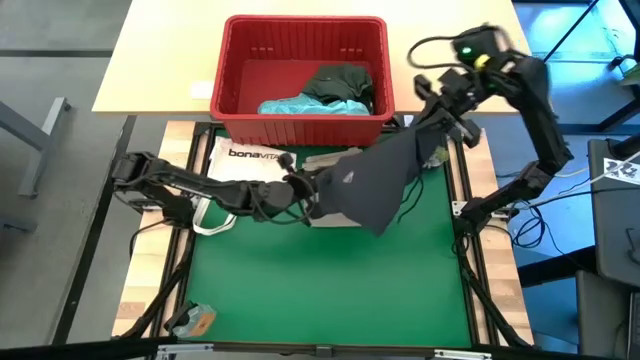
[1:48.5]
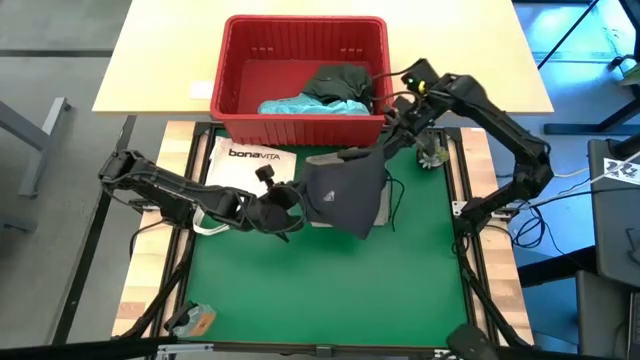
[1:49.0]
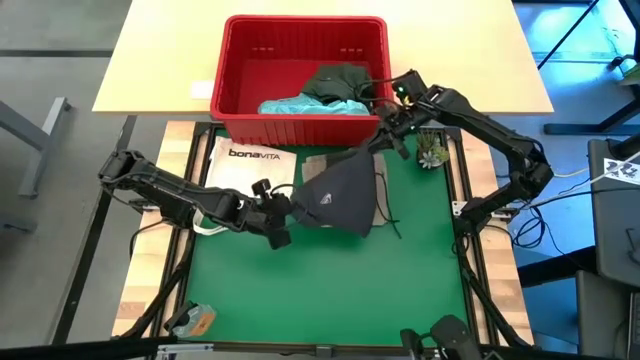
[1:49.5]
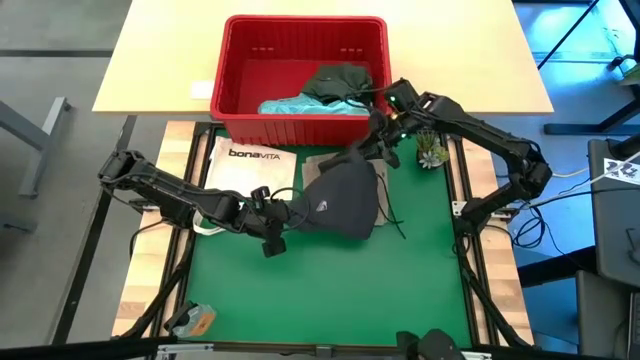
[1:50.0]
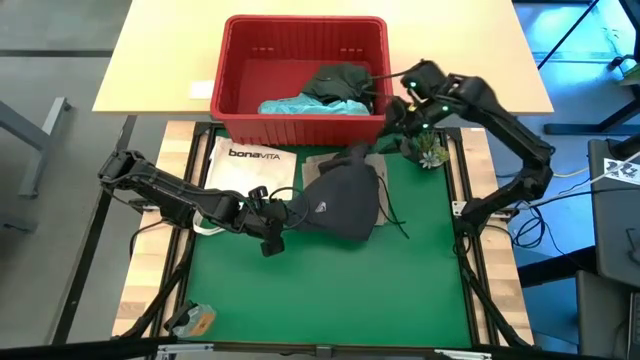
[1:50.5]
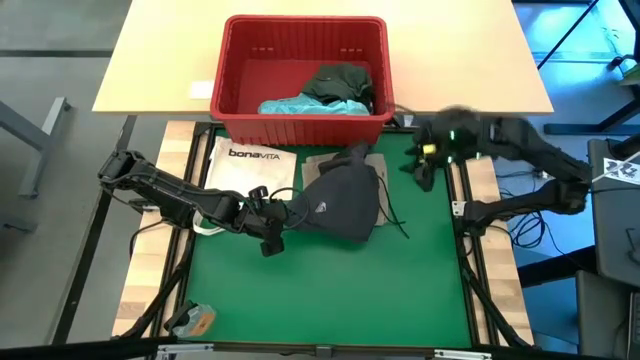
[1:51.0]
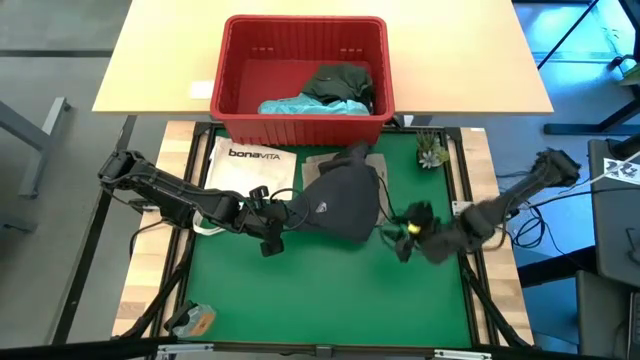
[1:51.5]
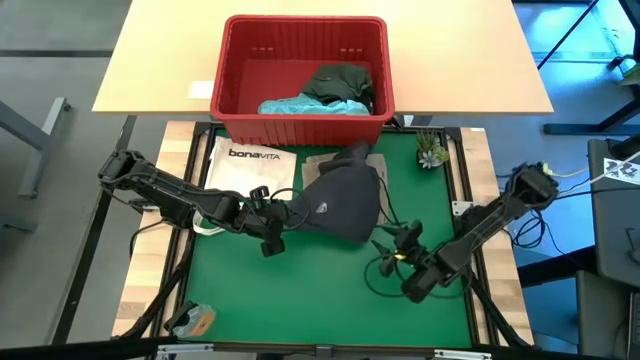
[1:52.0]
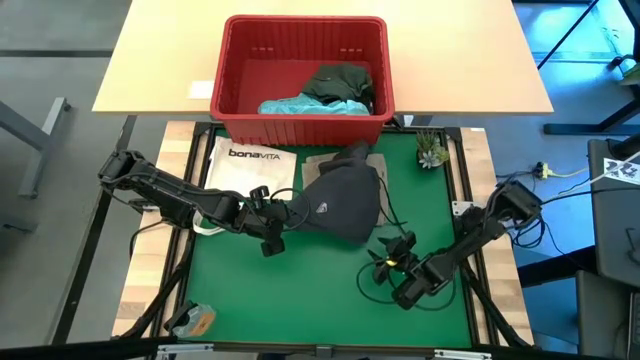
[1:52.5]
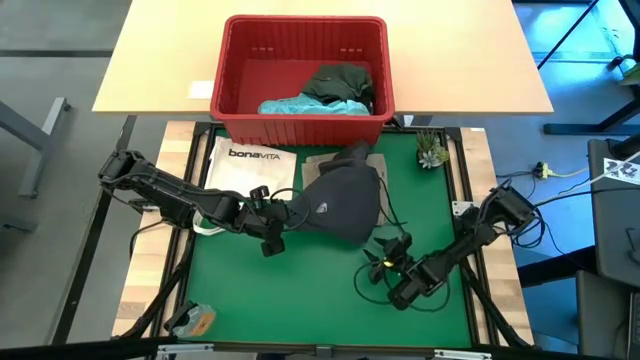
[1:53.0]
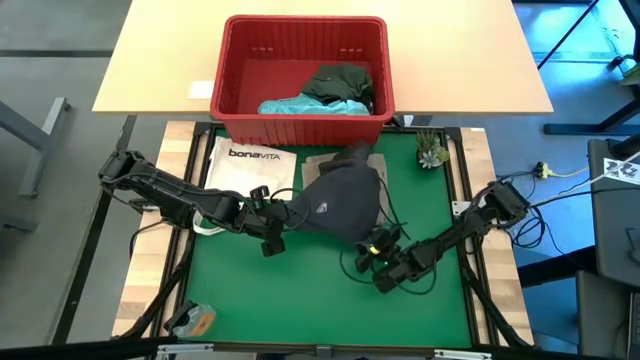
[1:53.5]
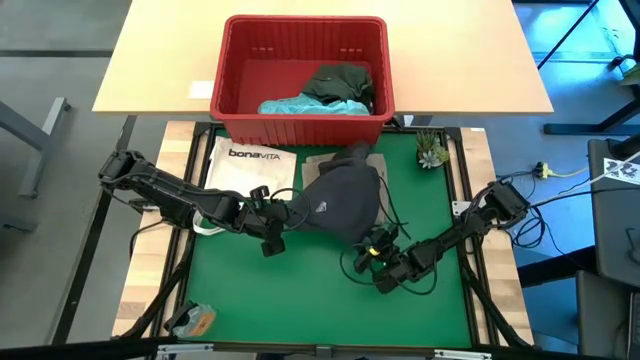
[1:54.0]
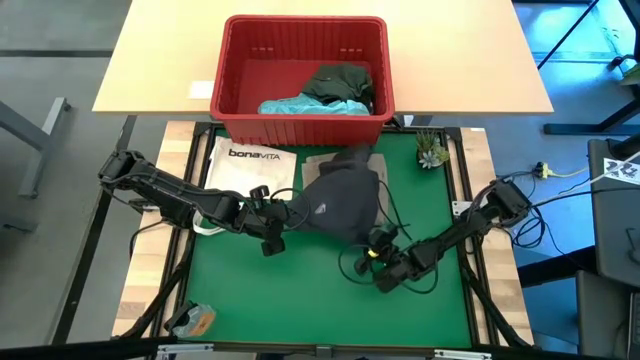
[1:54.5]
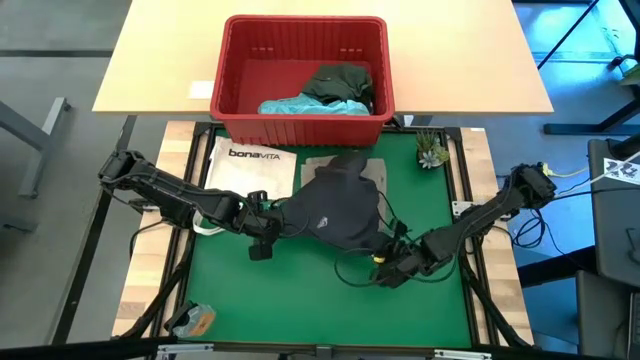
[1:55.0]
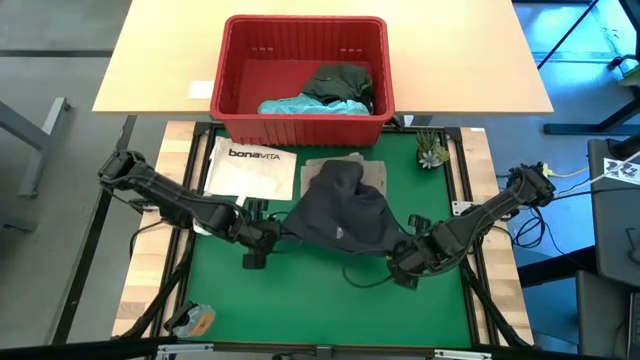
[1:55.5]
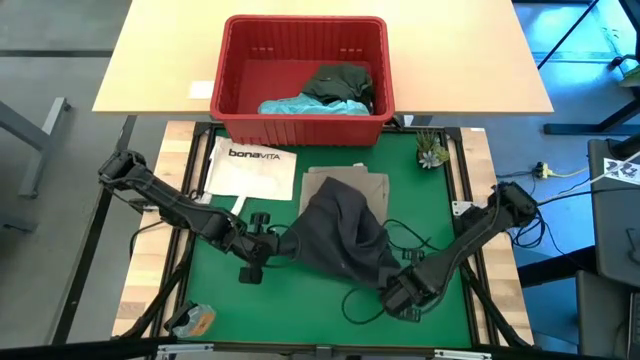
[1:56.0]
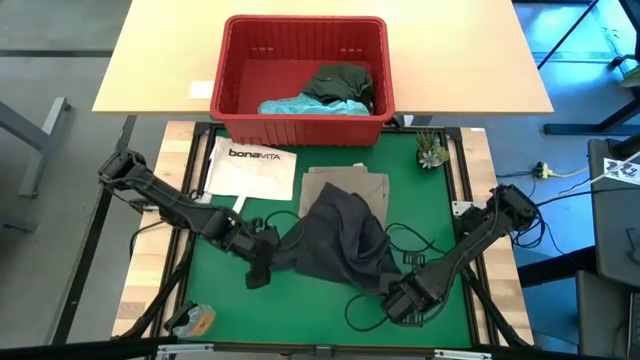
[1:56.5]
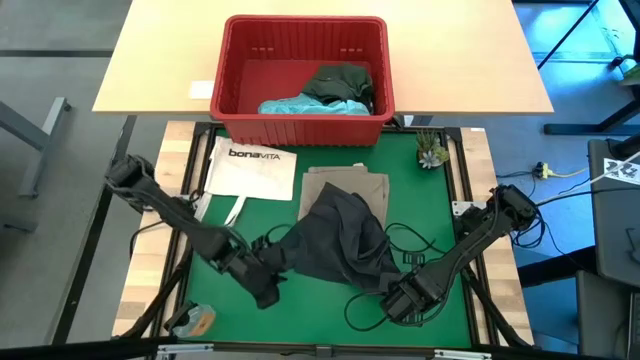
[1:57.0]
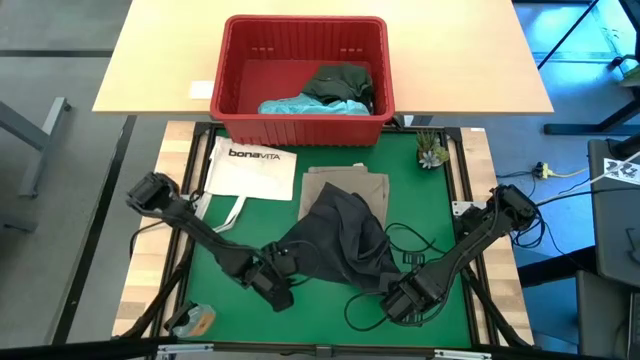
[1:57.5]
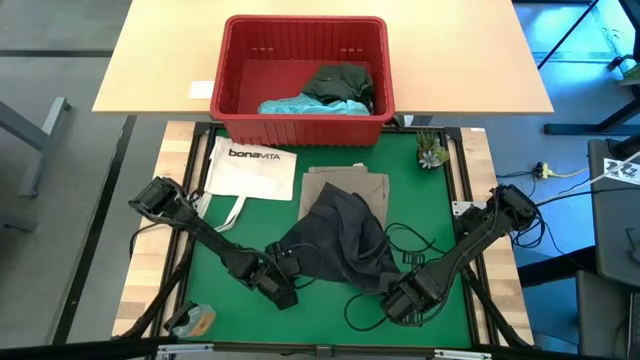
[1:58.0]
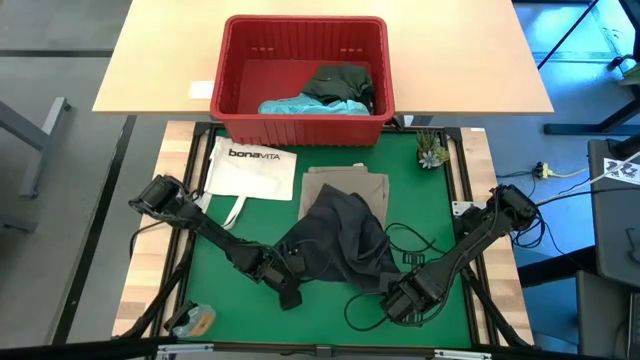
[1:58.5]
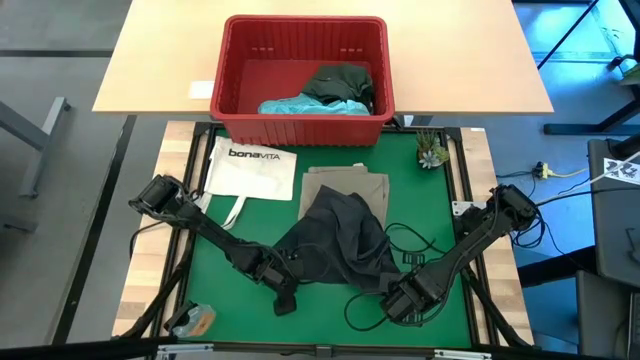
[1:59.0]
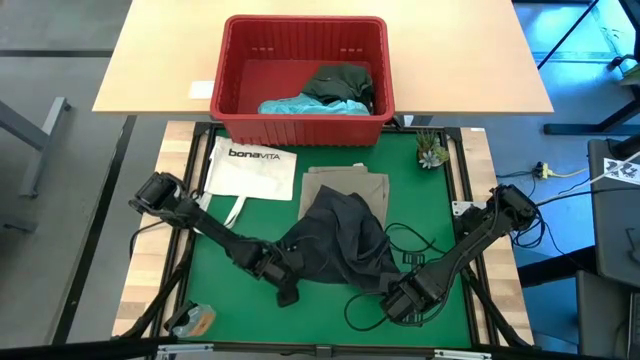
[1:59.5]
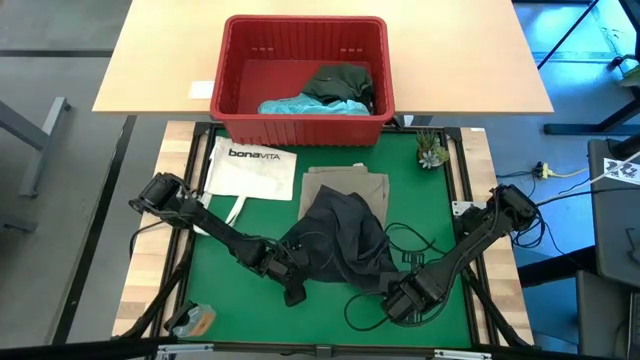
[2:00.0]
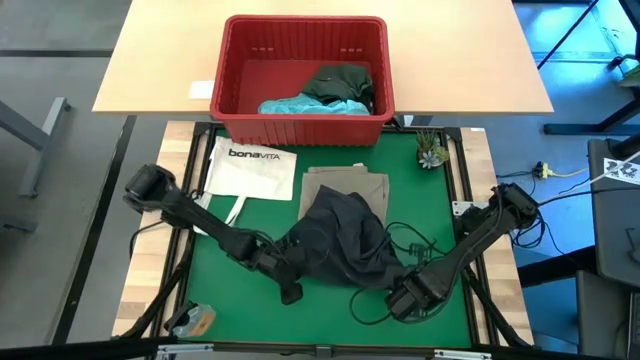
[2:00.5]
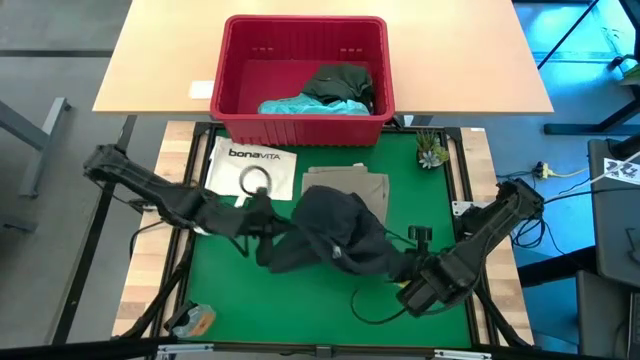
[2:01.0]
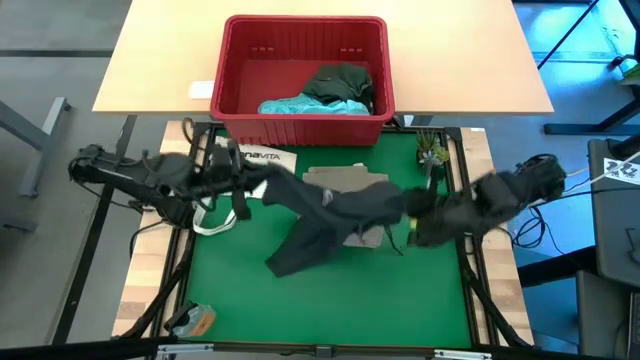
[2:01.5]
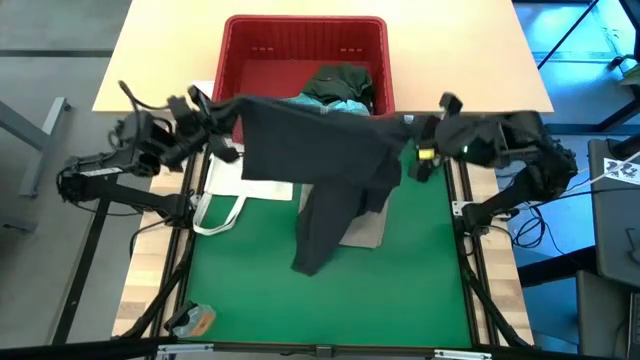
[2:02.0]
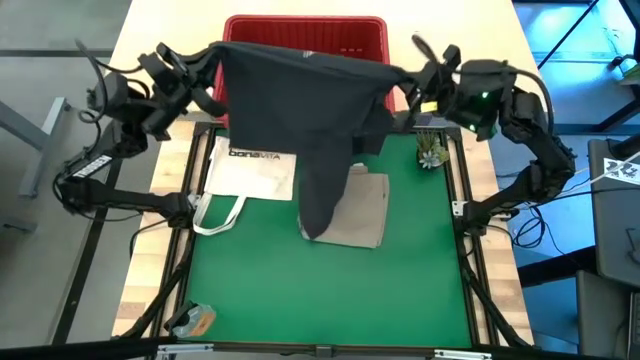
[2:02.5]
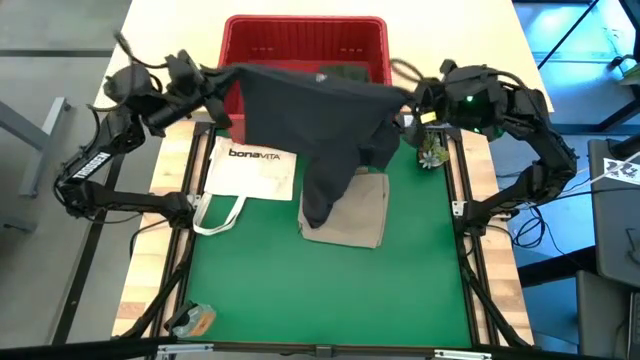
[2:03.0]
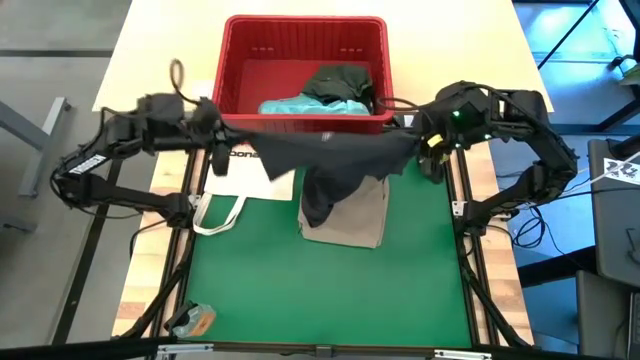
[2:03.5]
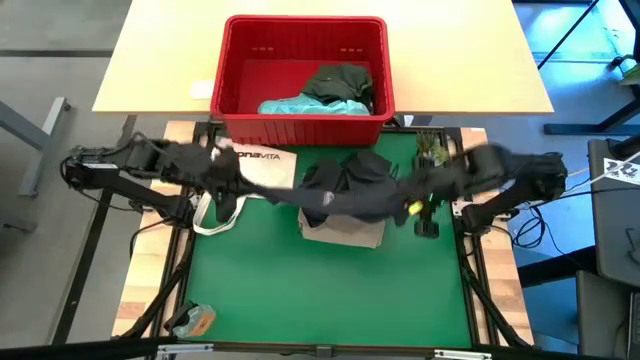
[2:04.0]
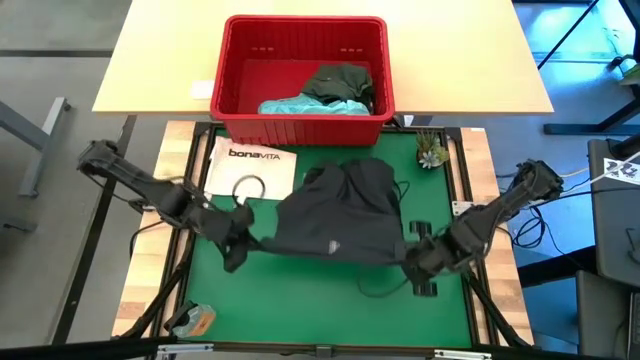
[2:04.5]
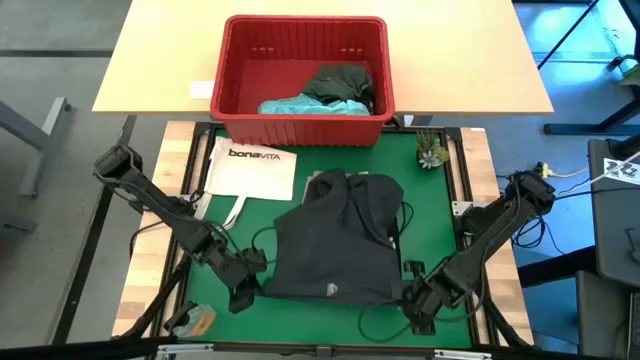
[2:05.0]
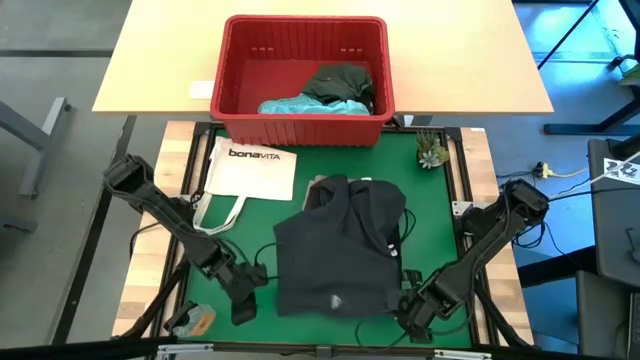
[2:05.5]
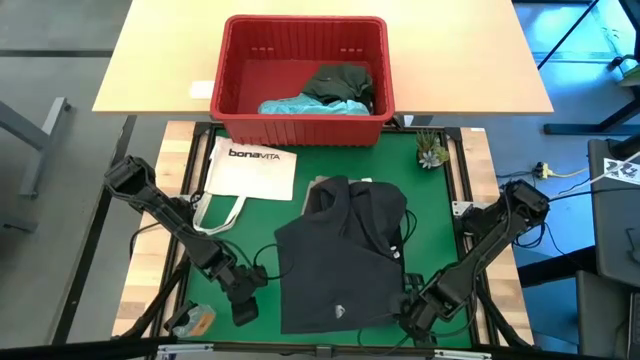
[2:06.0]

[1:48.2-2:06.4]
Task: Fold Laundry from Bin
Remove the black shorts from the red laundry bin

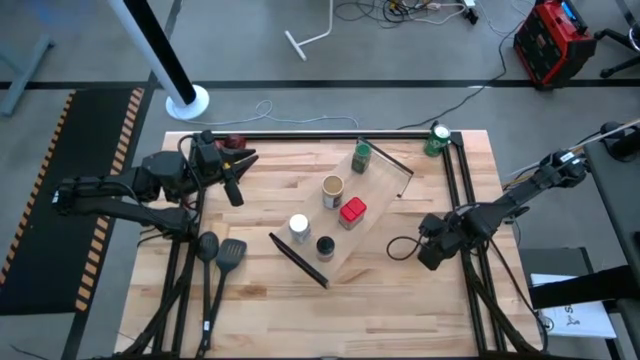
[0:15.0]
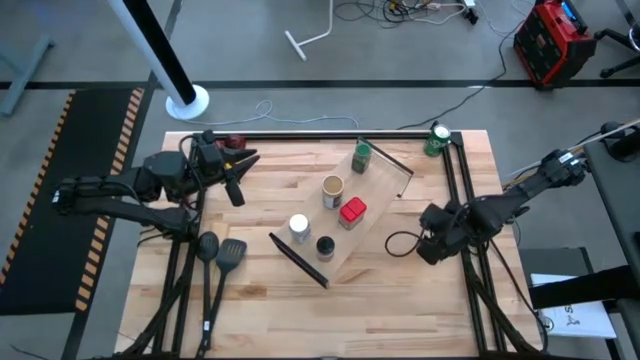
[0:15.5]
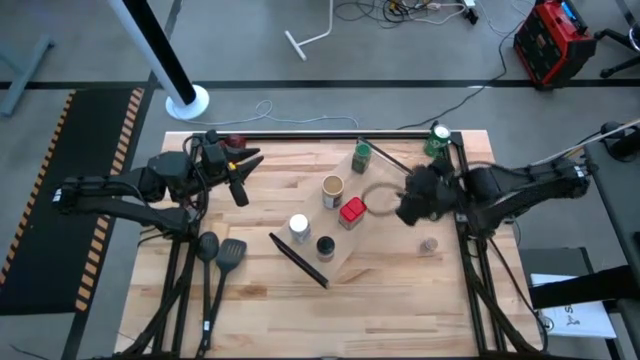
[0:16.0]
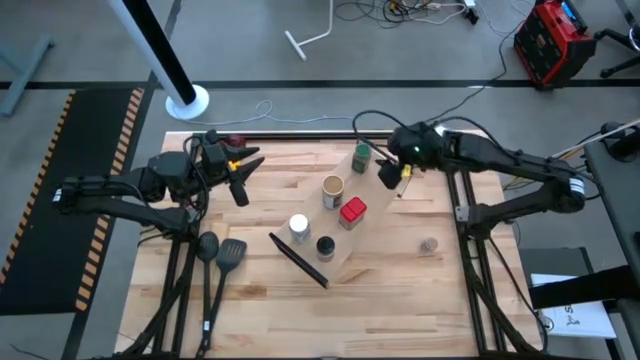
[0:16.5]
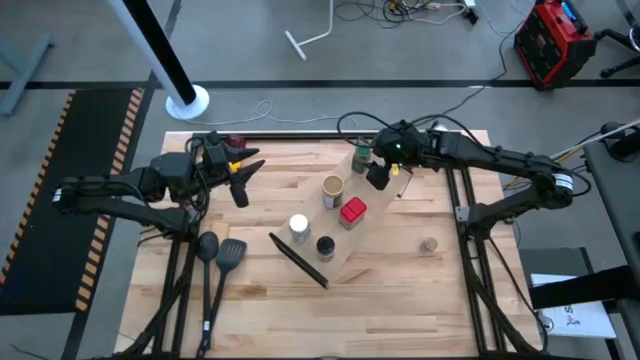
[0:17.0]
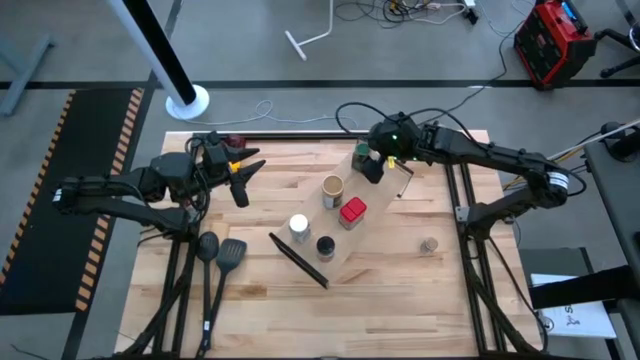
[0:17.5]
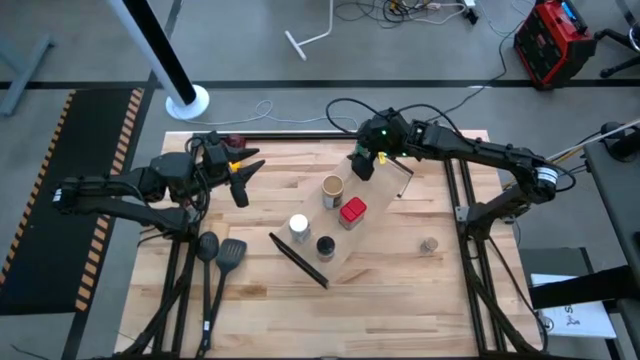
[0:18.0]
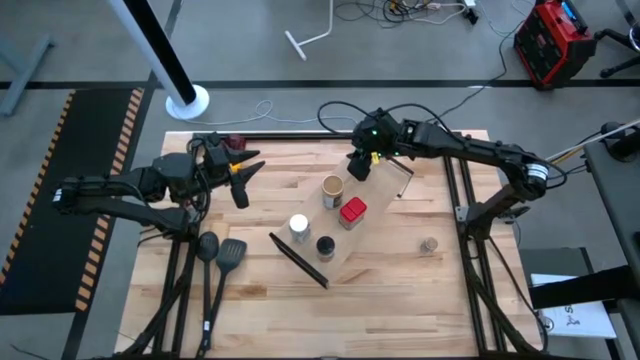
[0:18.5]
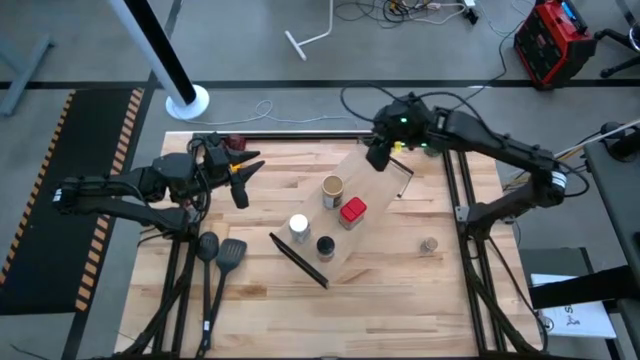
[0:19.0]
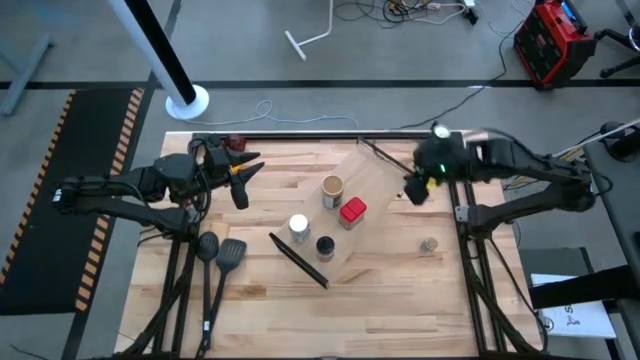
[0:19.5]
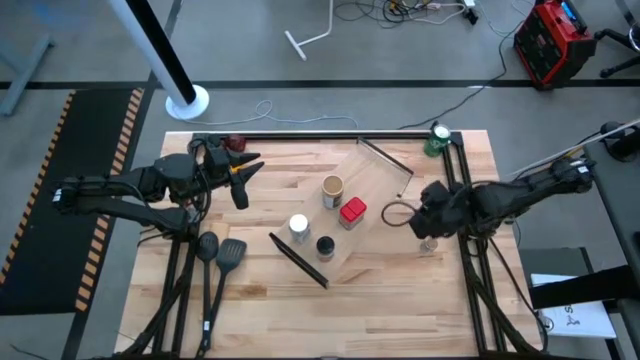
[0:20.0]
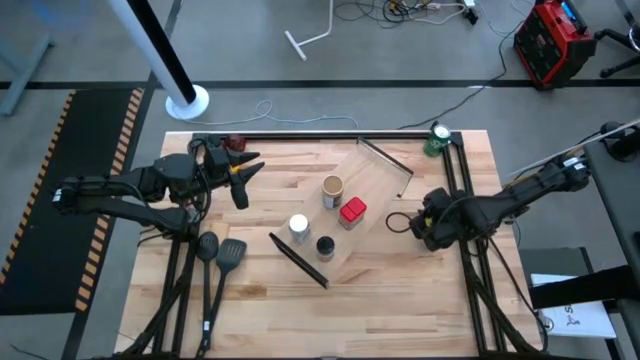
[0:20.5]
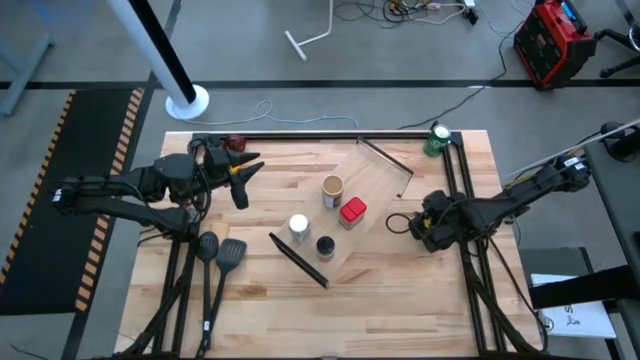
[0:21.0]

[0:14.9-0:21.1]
Task: Shelf spices
Remove the green seasoning bottle from the shelf
